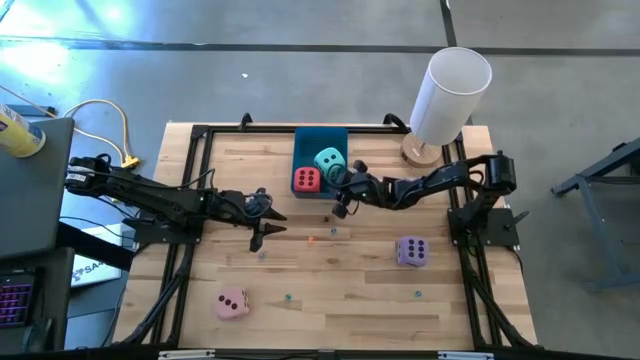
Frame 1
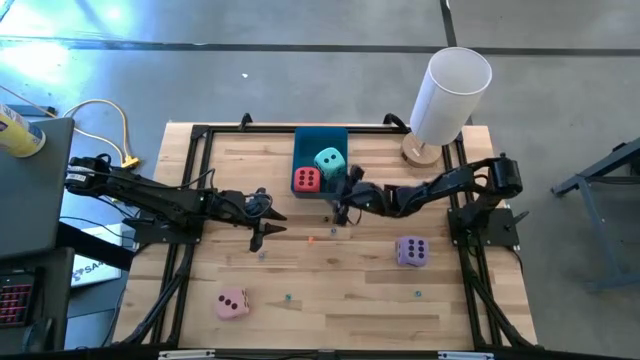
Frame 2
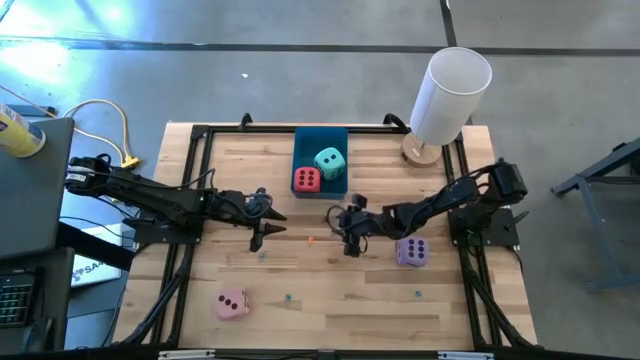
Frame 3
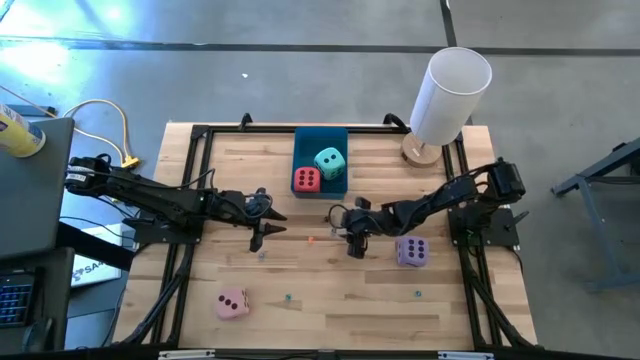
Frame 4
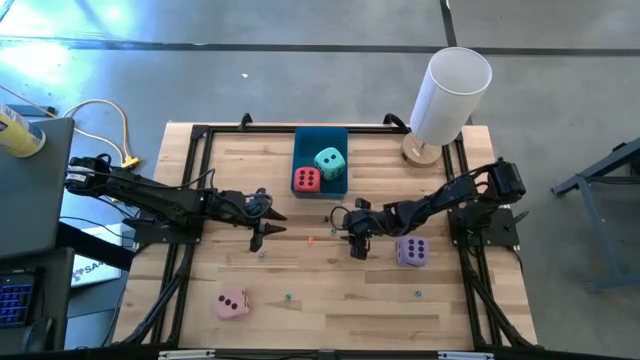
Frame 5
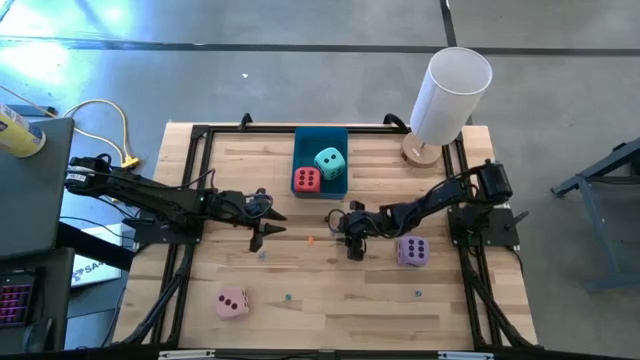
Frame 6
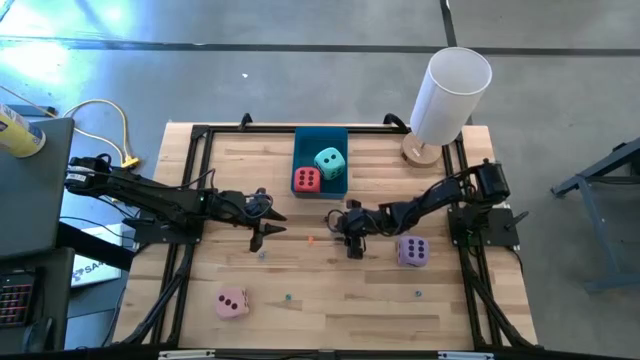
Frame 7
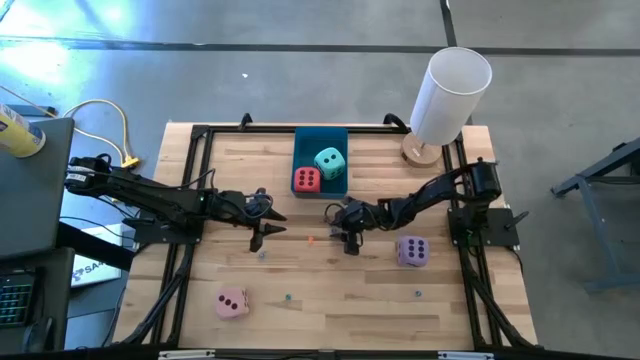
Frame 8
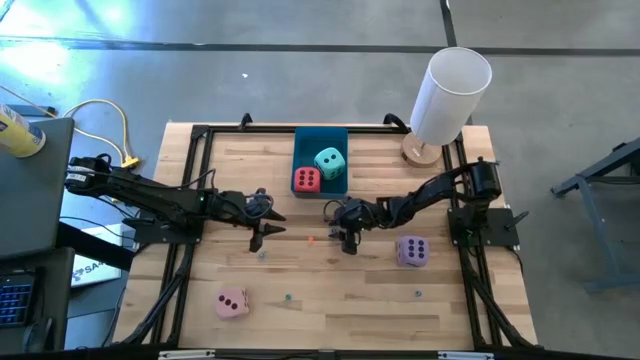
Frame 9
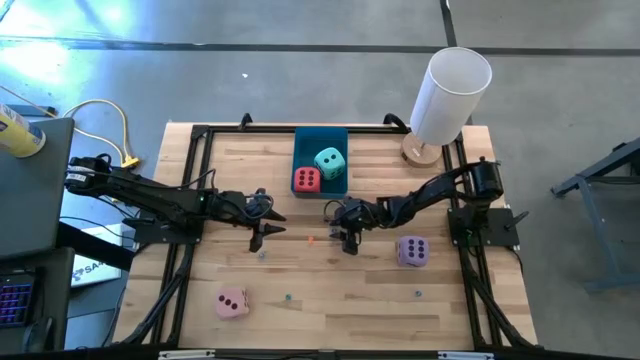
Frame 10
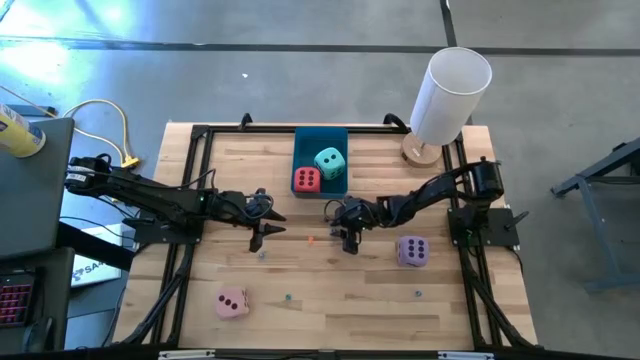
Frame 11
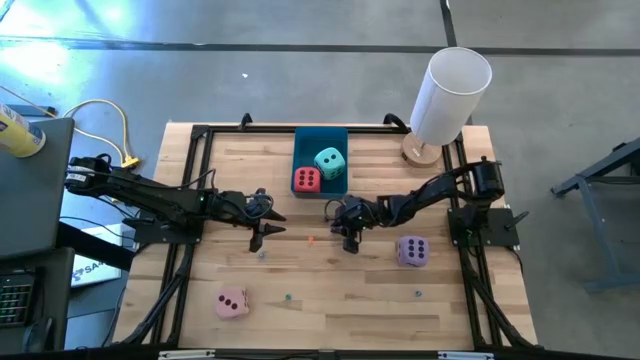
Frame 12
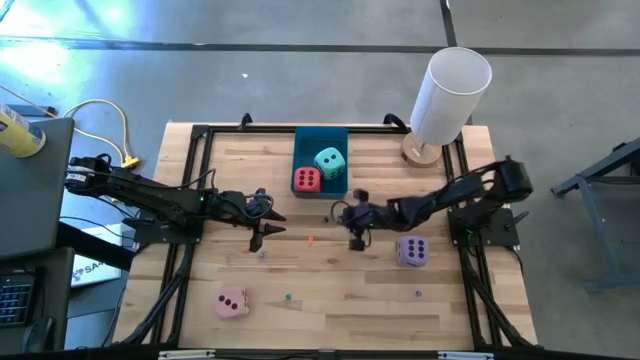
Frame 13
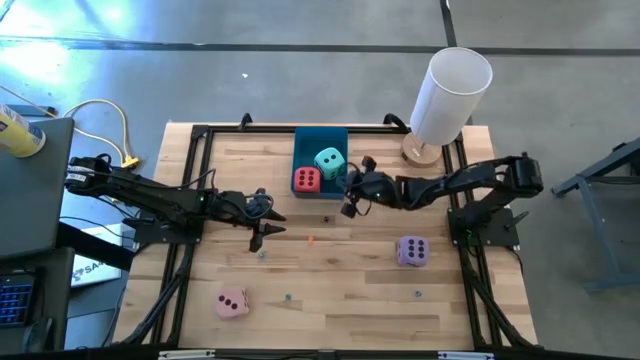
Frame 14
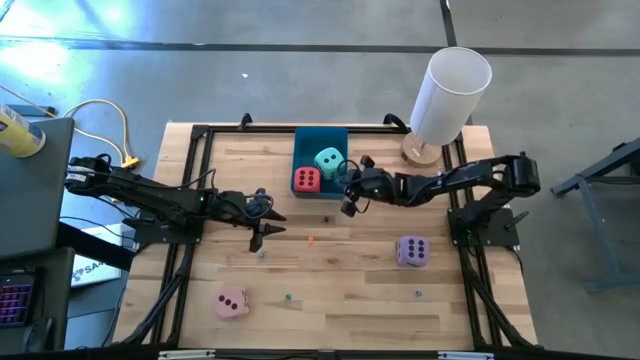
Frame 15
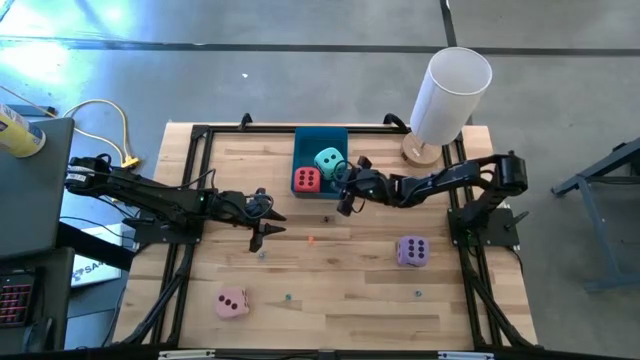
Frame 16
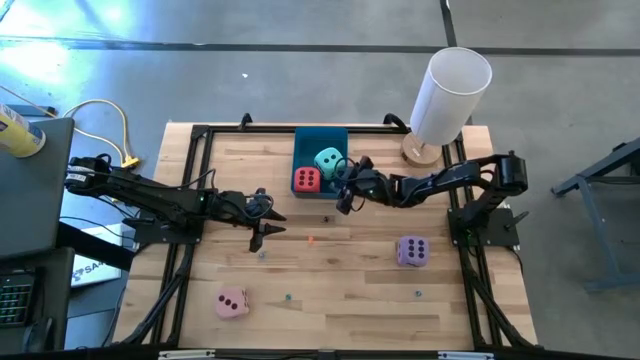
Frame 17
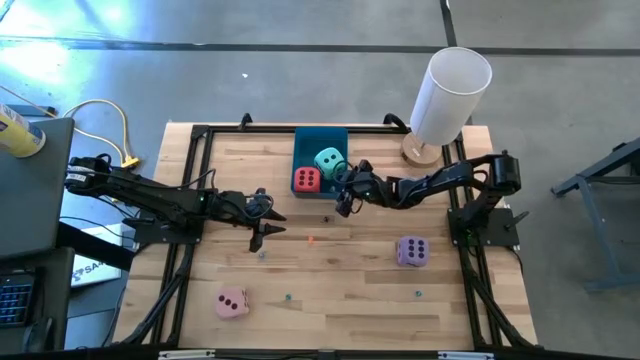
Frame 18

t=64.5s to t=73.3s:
Task: Pick & Place Dice
Put the top small light blue die into the blue bin

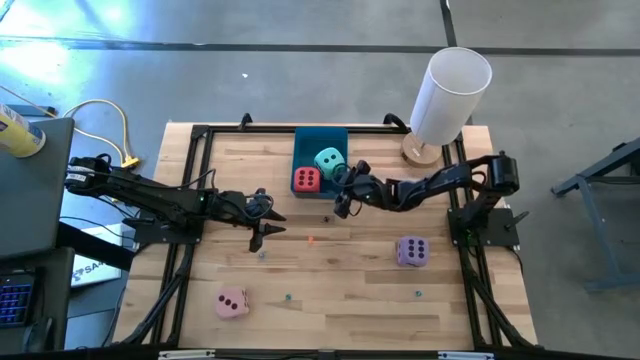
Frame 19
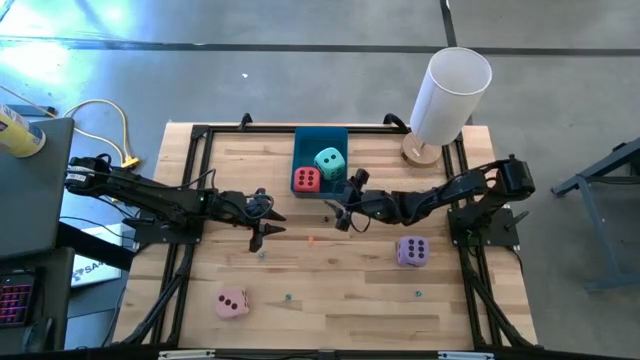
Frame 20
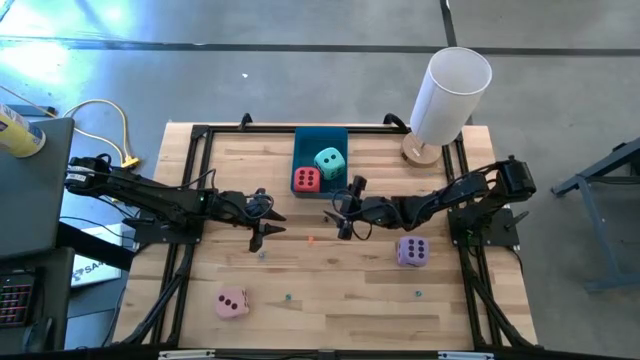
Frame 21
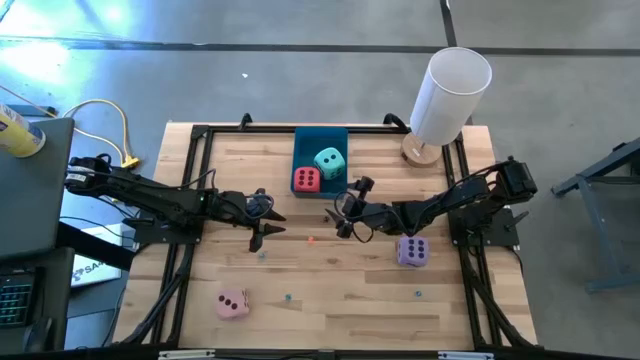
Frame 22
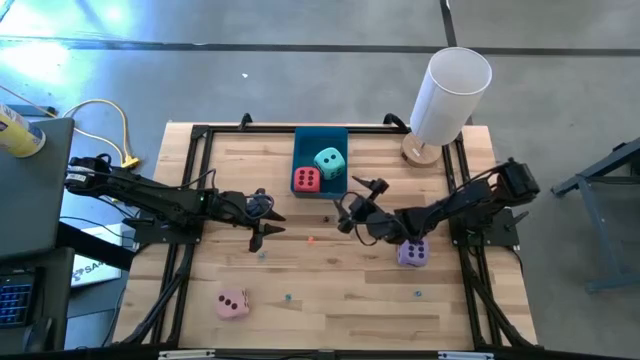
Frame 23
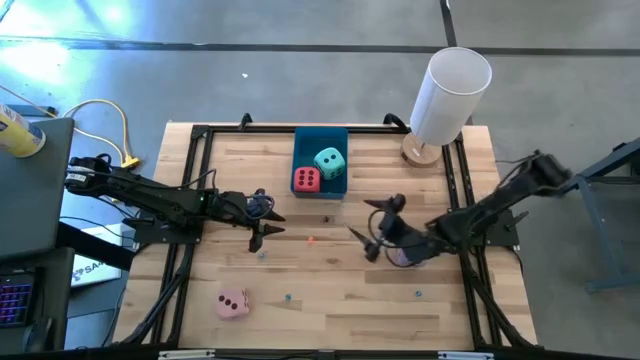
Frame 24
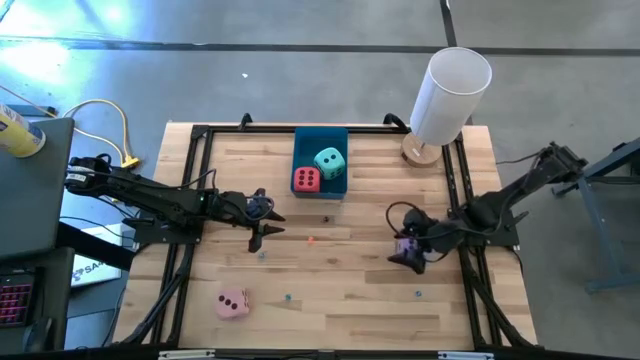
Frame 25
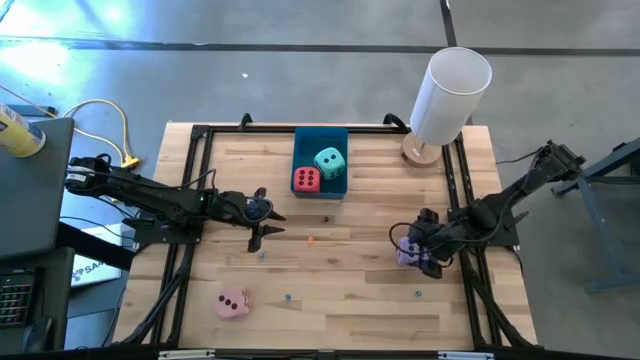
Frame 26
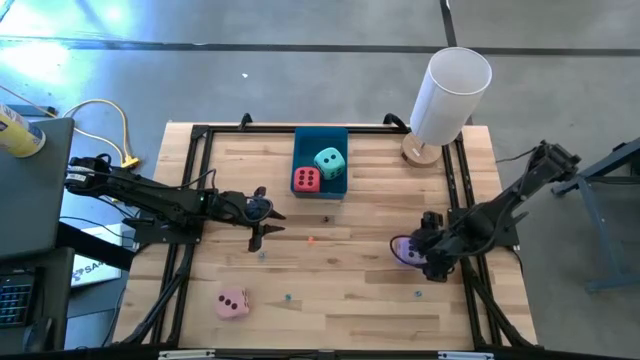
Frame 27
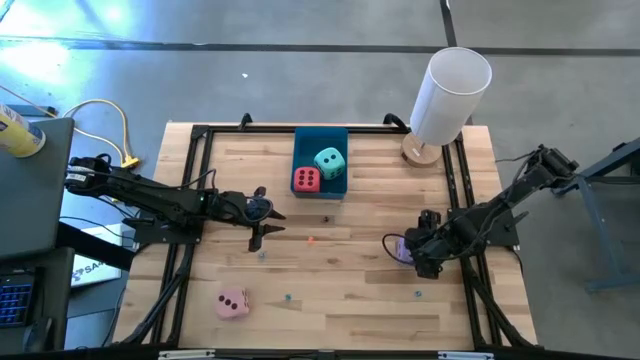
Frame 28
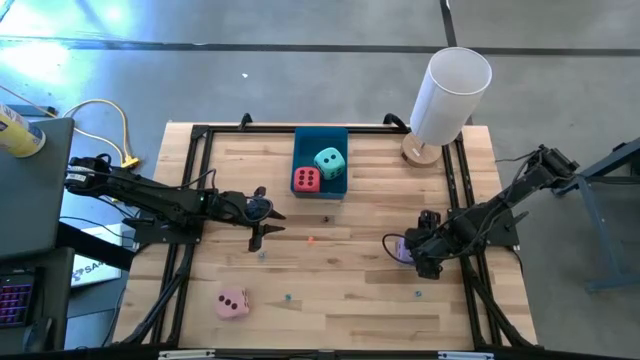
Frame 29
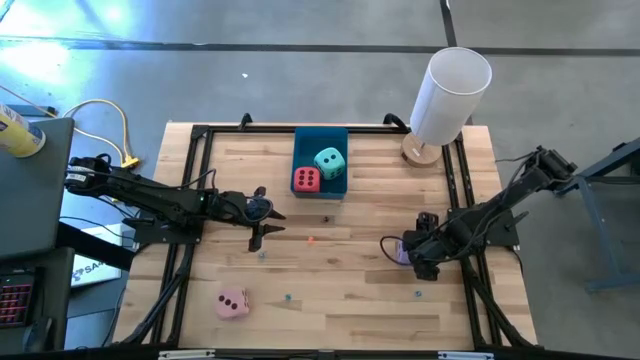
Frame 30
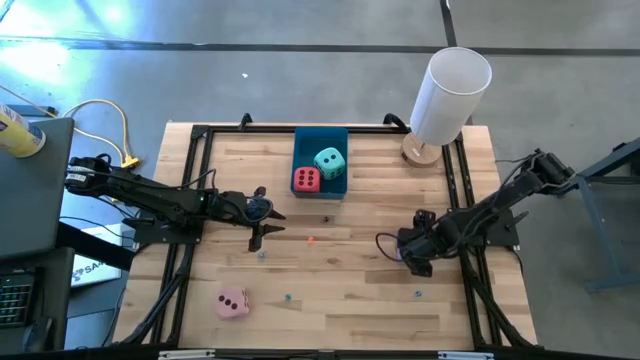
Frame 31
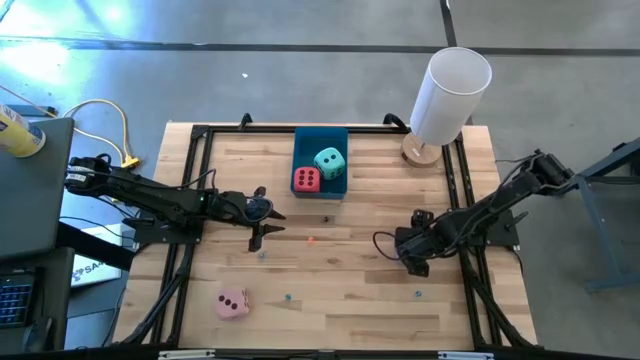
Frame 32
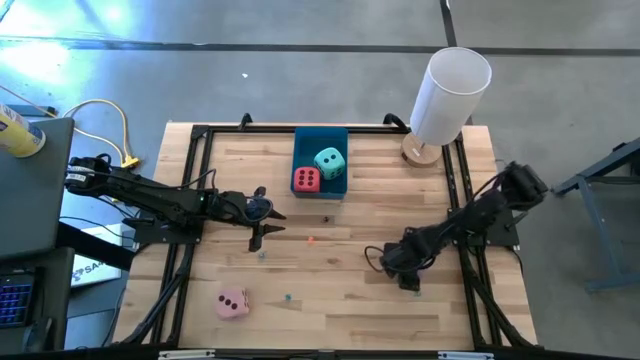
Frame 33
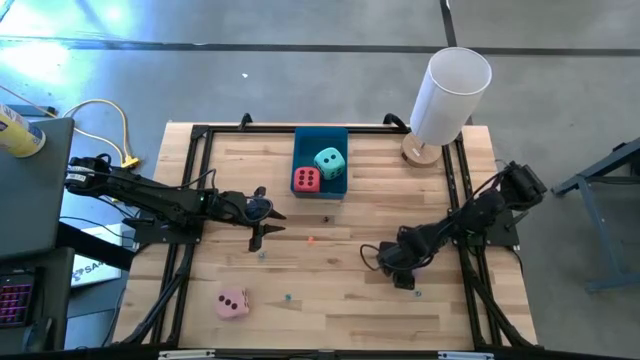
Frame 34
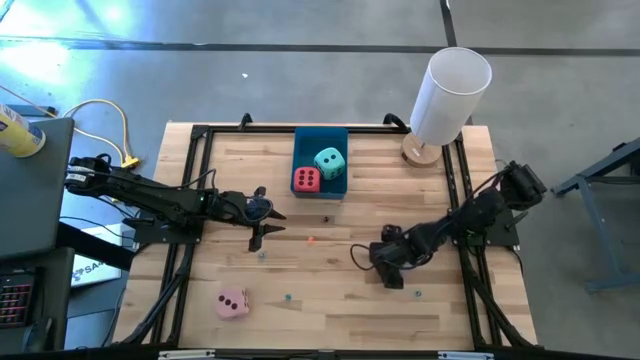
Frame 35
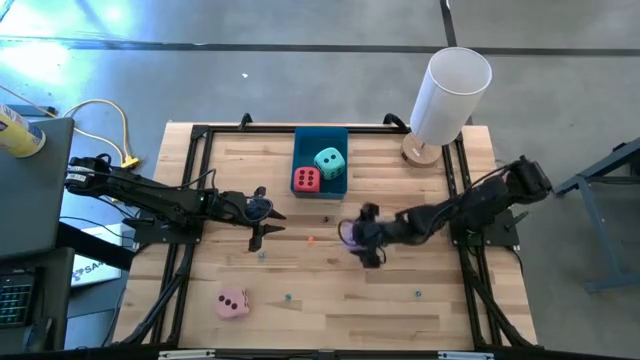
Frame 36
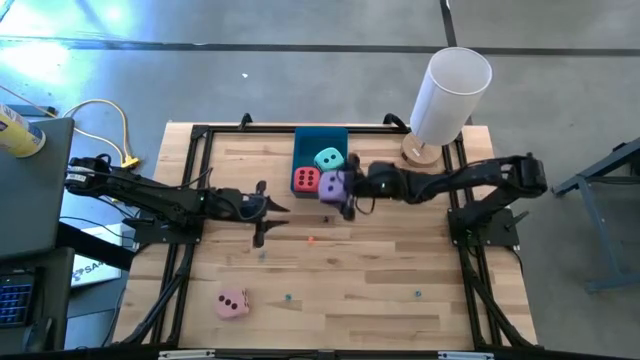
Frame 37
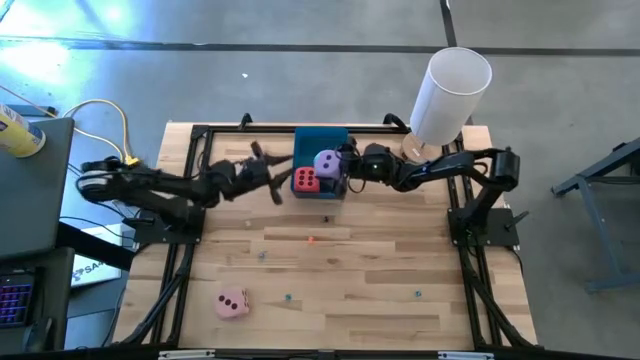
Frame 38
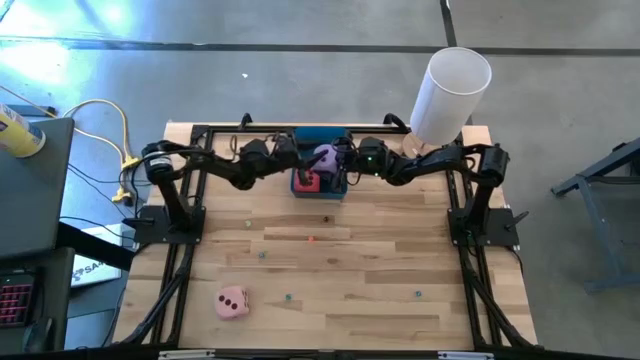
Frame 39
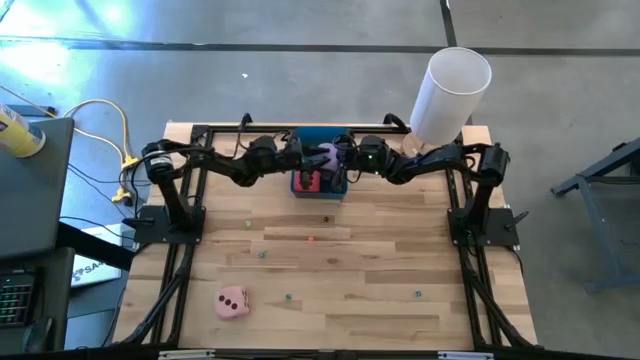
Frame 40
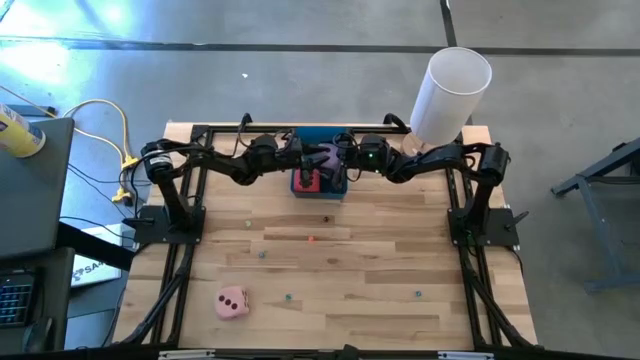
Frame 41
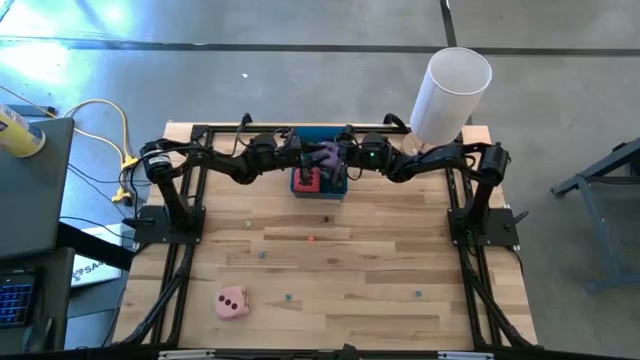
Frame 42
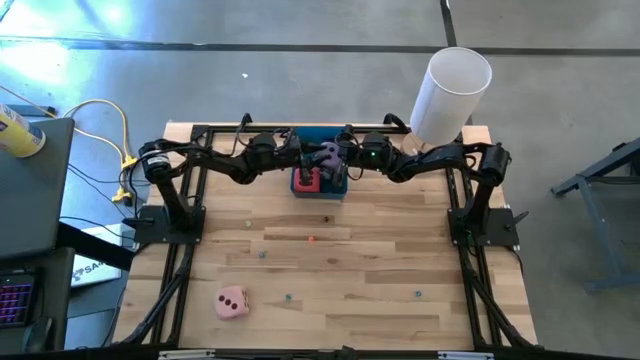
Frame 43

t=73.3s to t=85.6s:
Put the purple die into the blue bin
